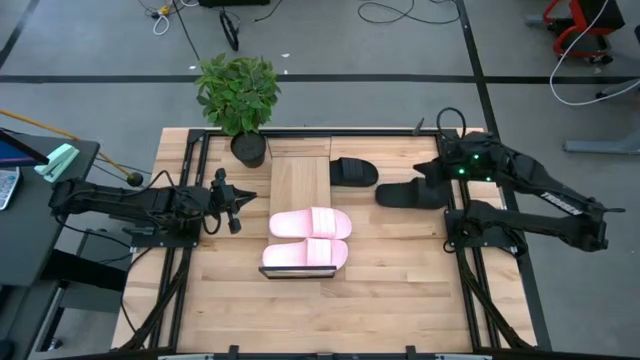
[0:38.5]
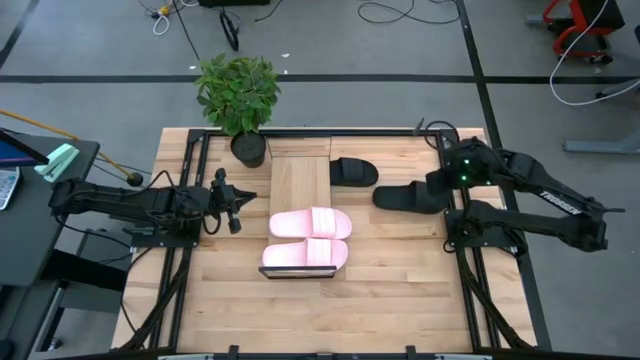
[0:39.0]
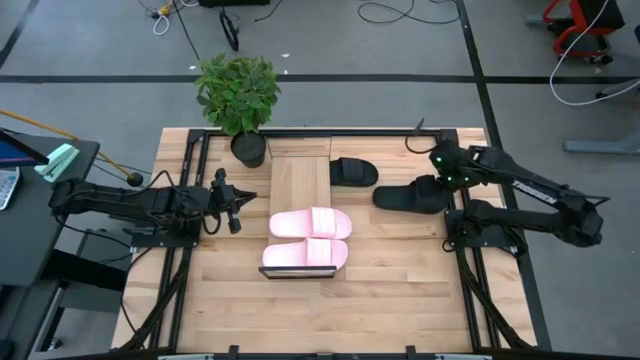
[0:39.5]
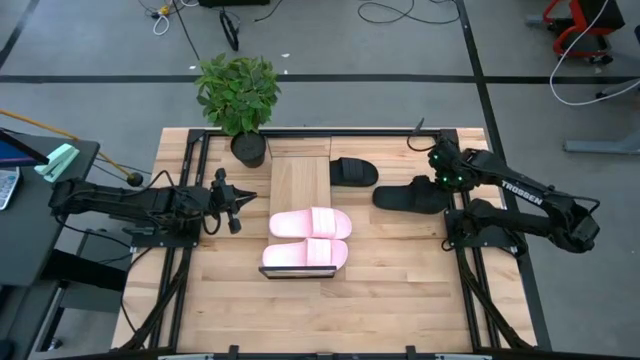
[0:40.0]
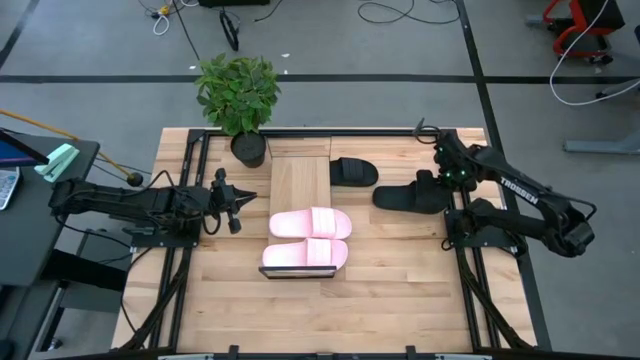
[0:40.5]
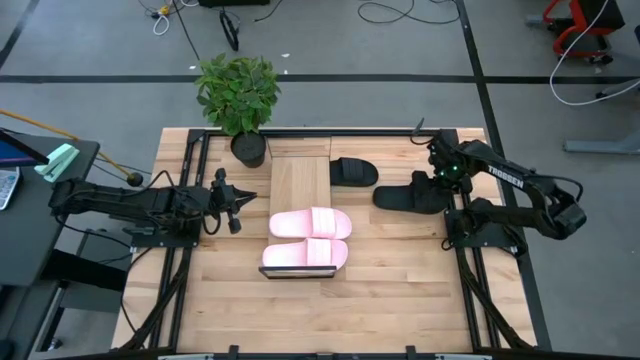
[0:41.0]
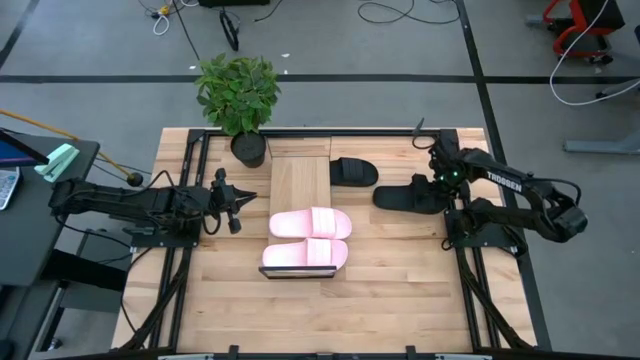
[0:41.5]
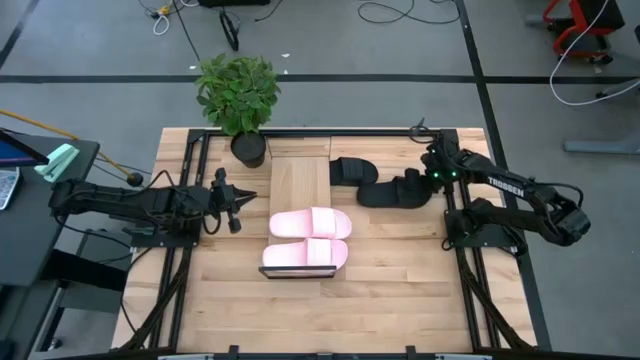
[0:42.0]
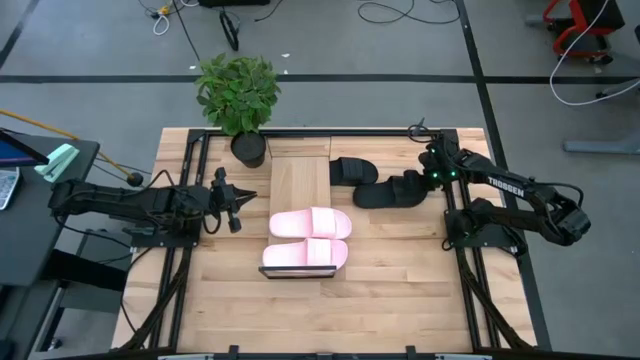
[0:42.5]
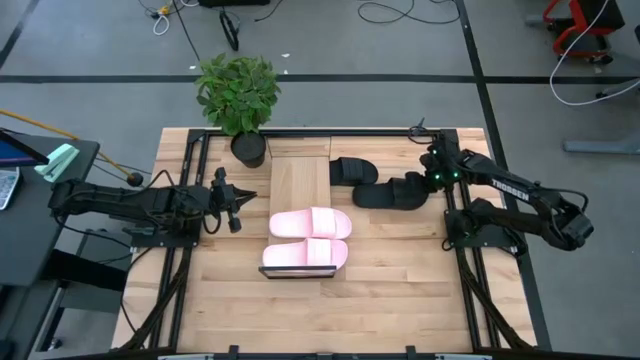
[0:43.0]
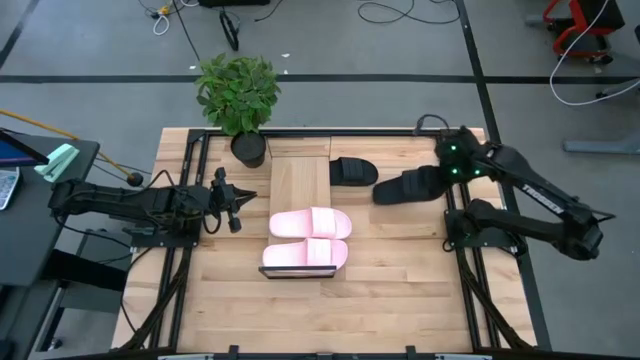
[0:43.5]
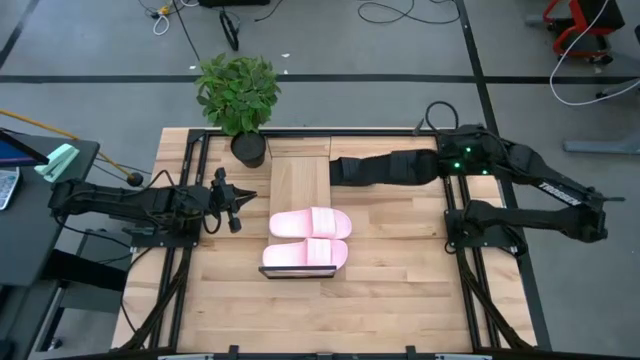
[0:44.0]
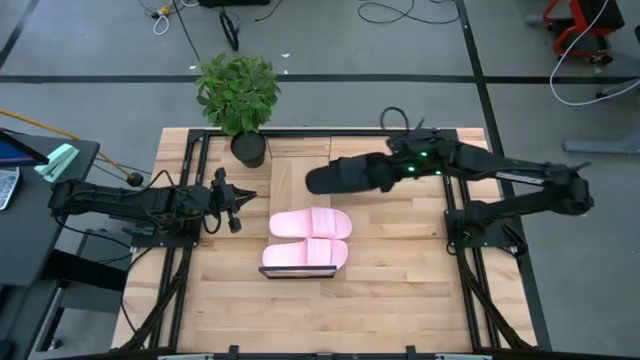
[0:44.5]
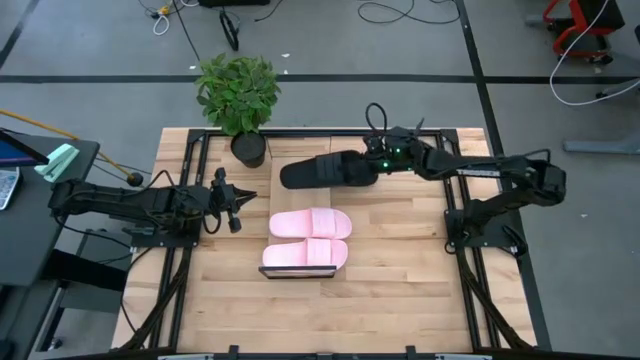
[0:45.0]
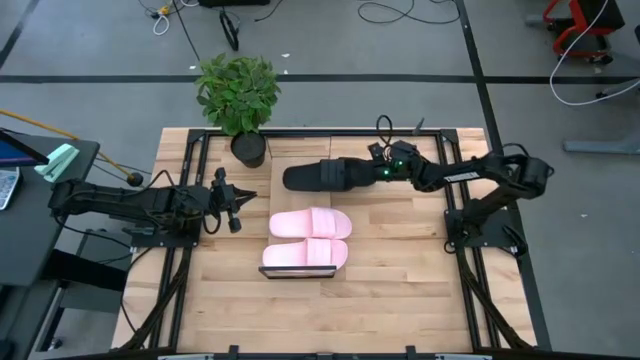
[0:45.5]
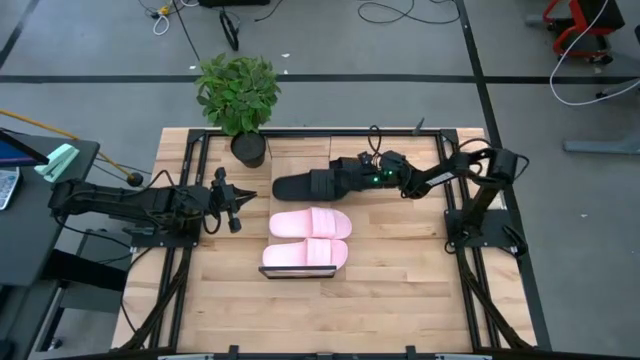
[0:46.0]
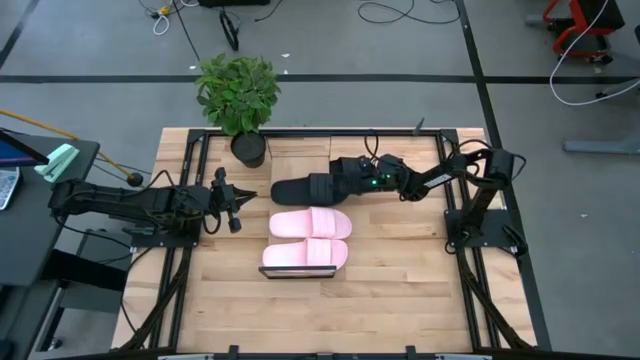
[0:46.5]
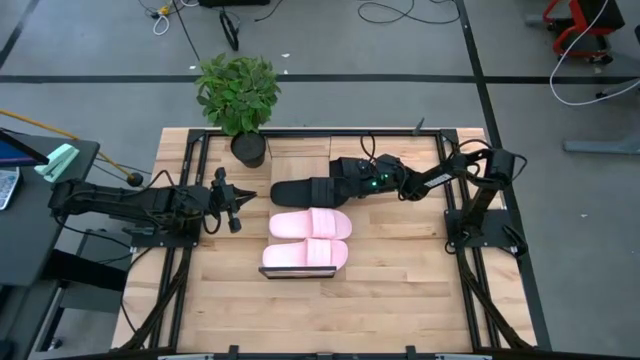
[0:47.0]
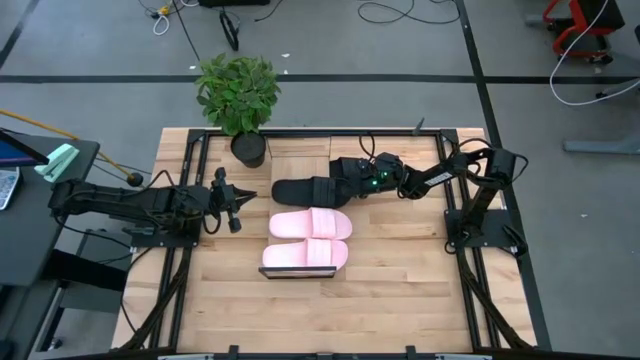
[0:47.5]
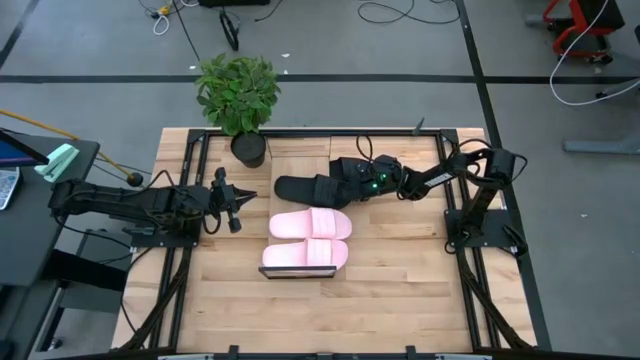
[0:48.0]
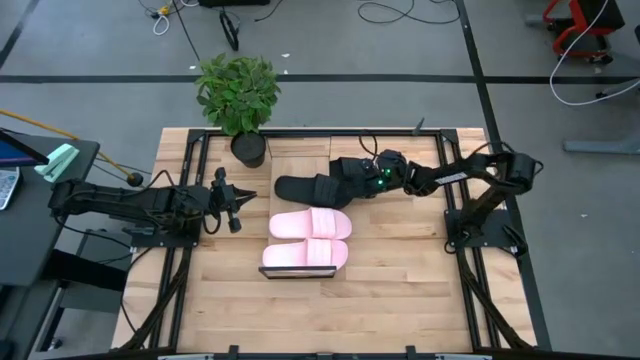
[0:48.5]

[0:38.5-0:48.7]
Task: Pick and place slides into the shelf
Put the bottom black slipper on the shelf
